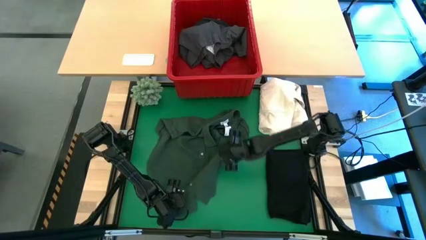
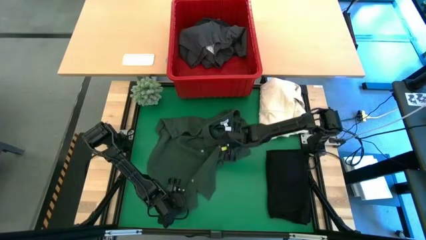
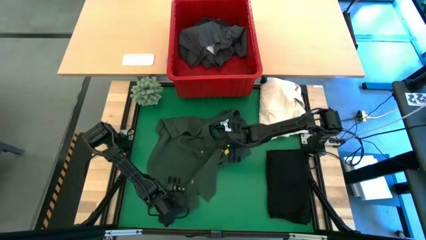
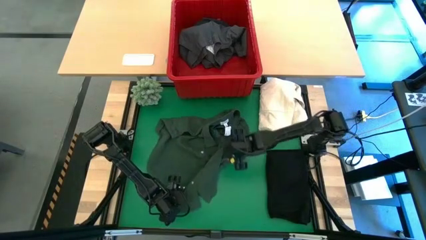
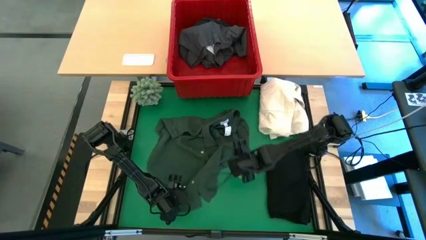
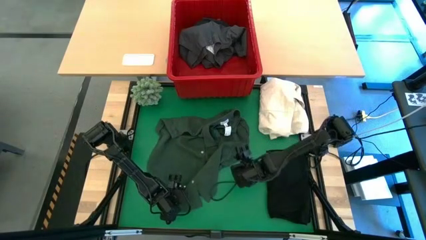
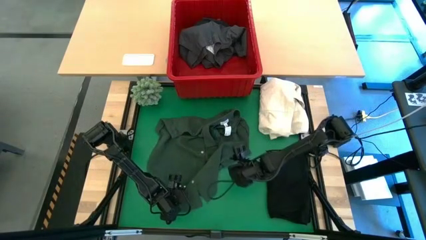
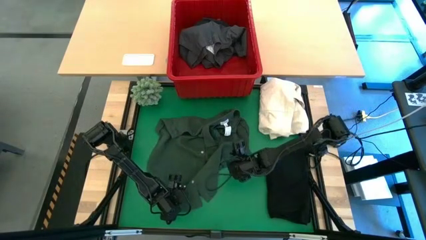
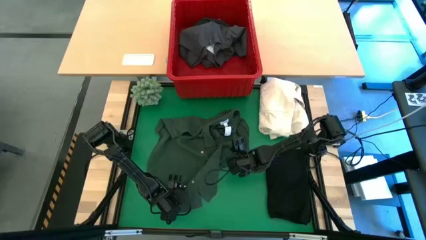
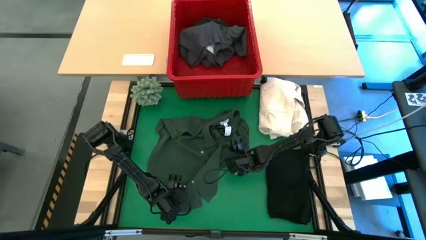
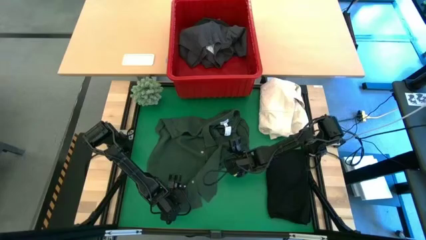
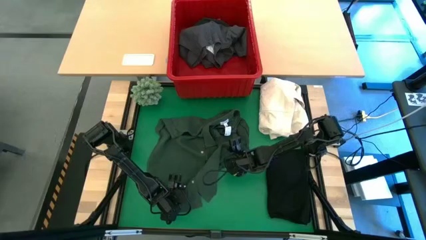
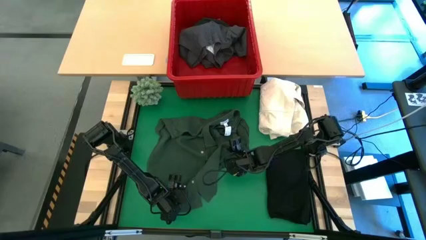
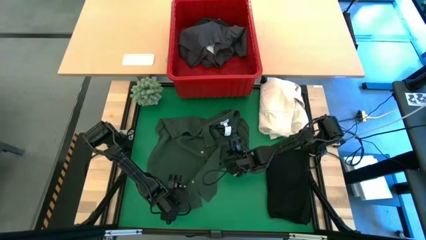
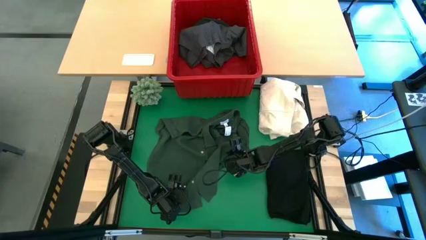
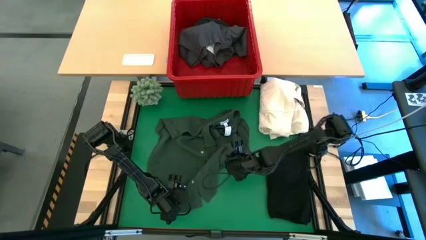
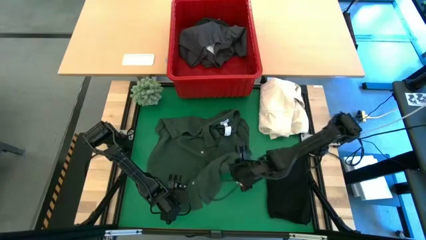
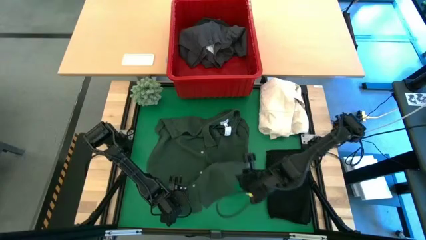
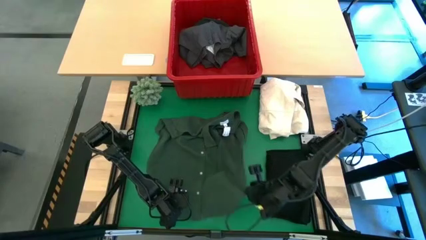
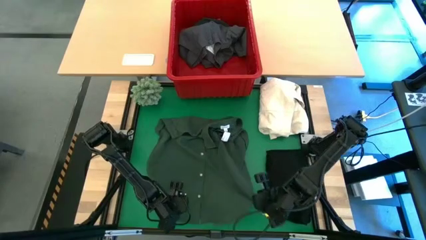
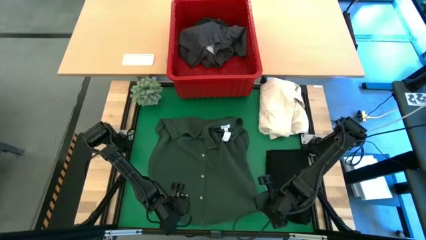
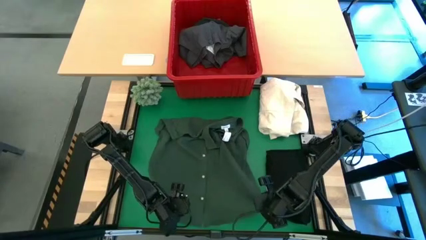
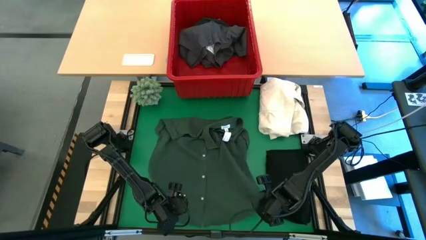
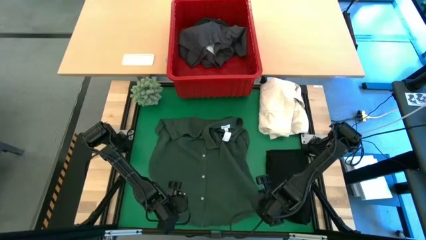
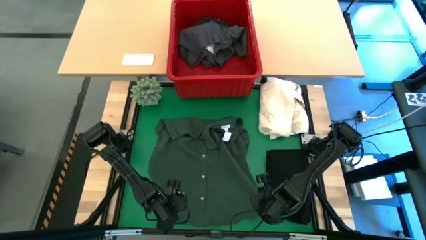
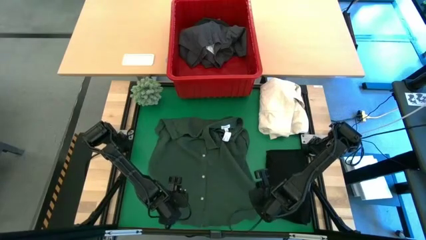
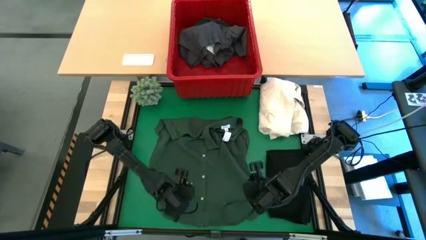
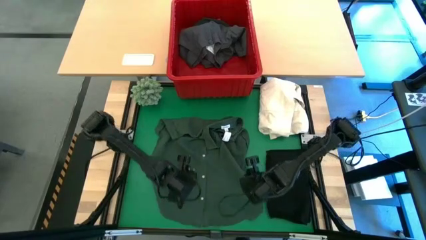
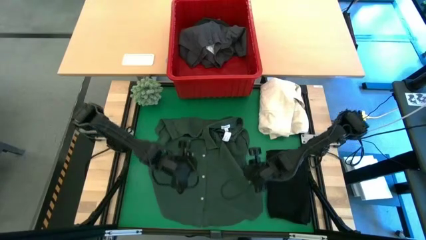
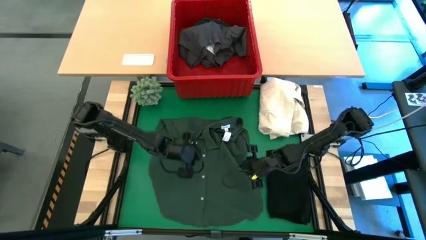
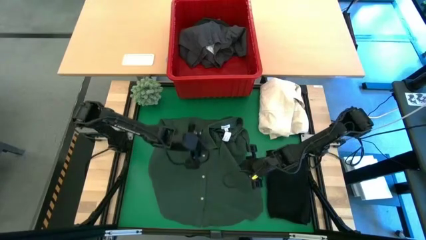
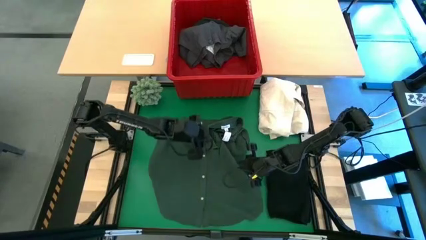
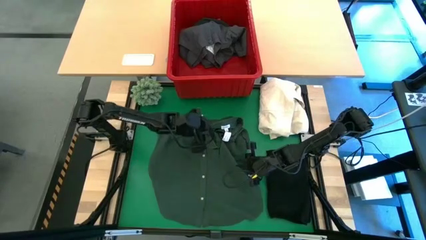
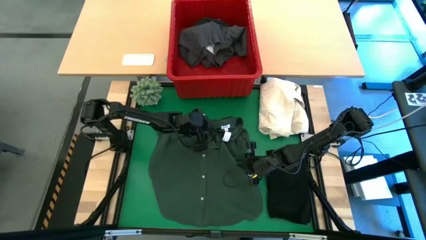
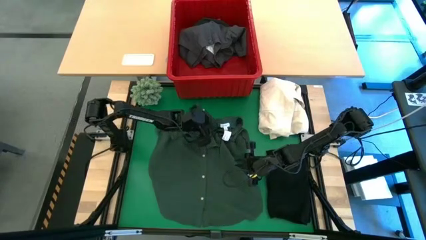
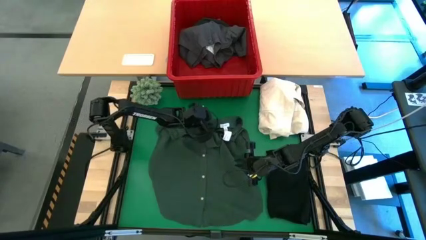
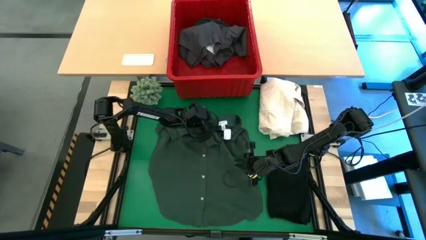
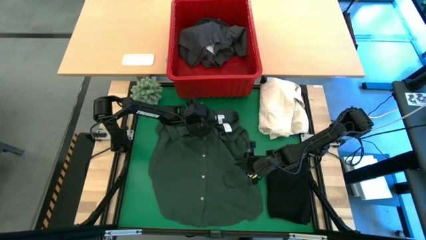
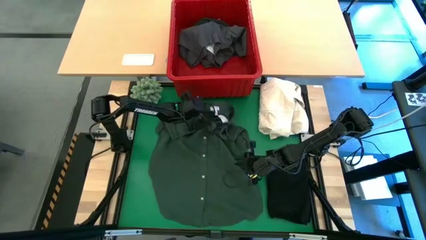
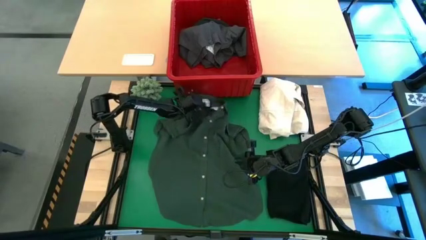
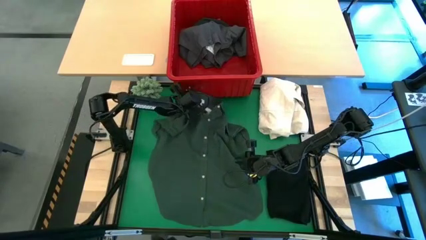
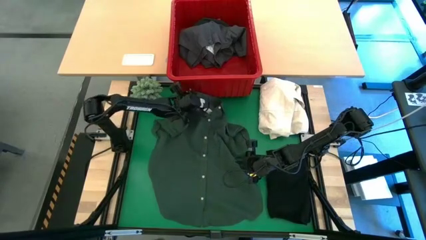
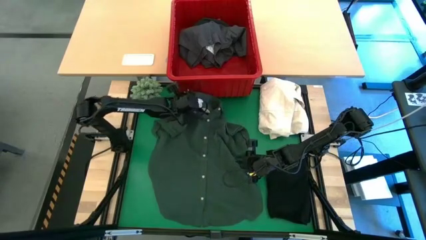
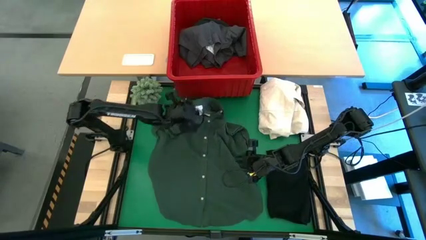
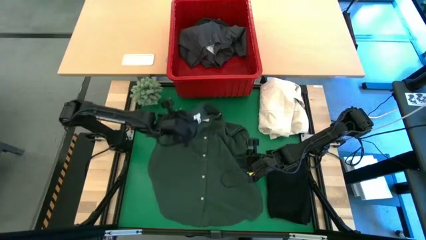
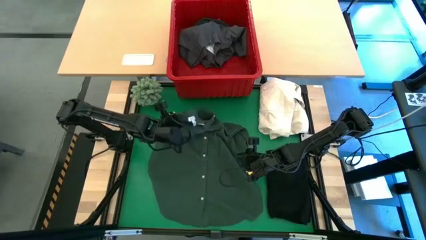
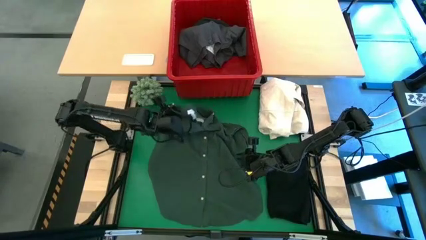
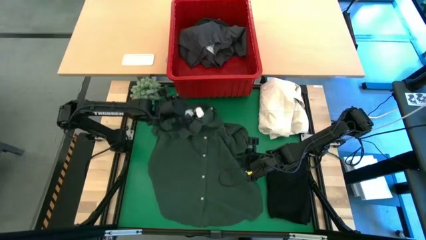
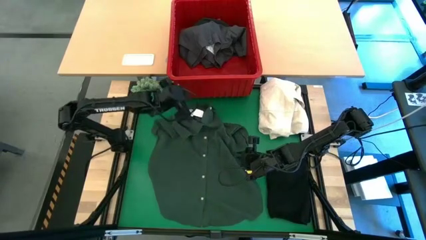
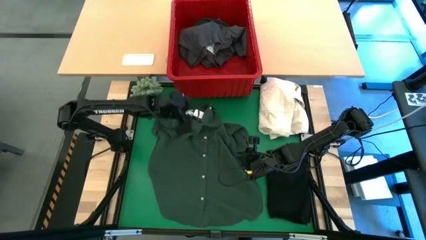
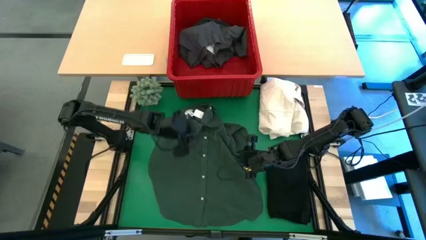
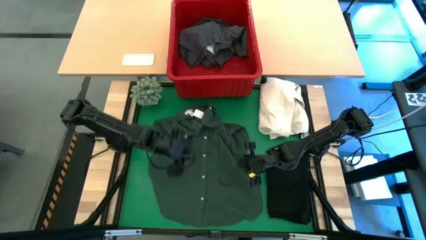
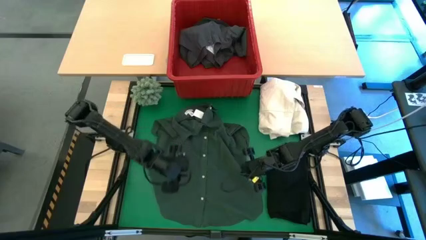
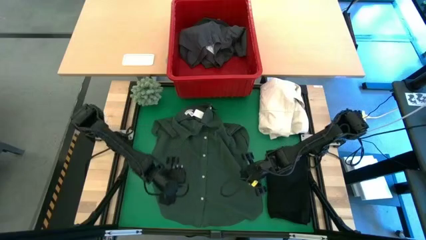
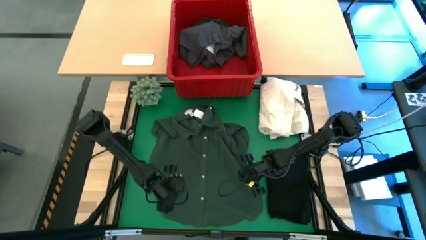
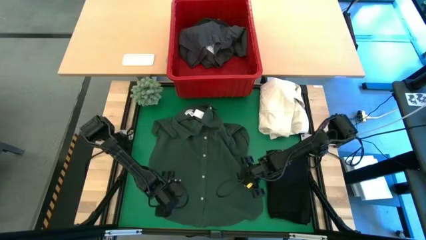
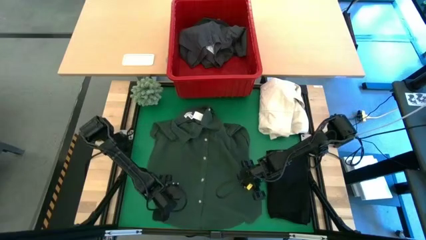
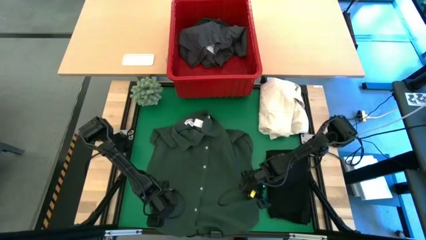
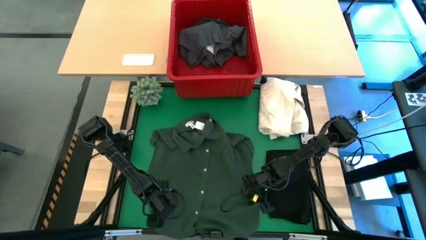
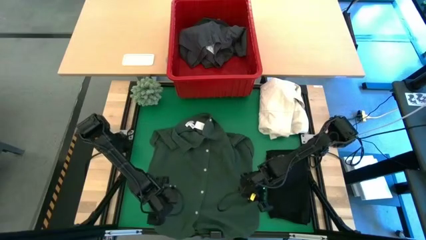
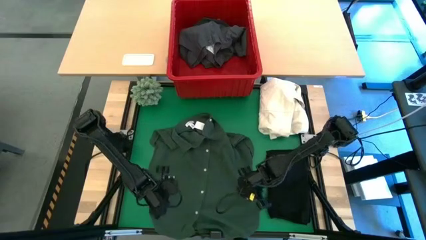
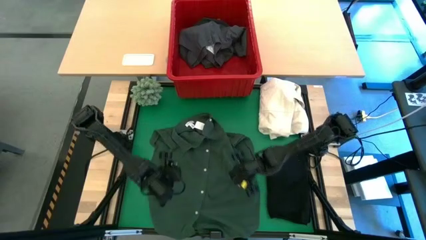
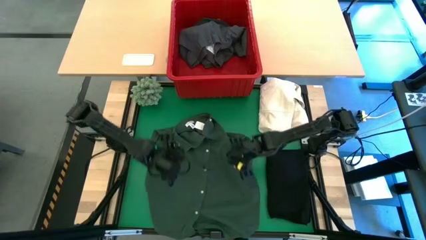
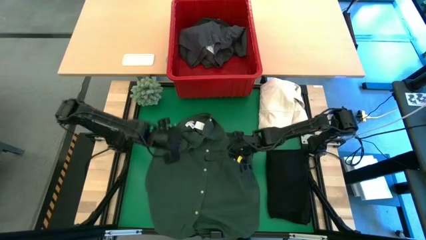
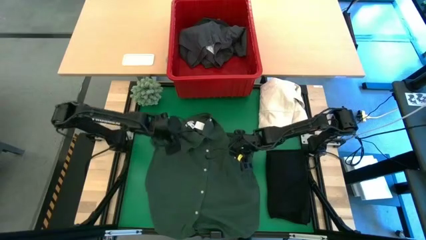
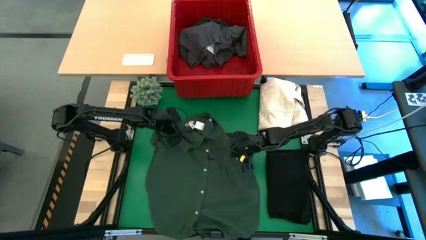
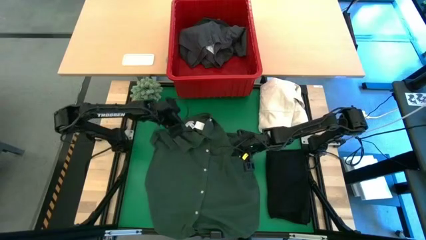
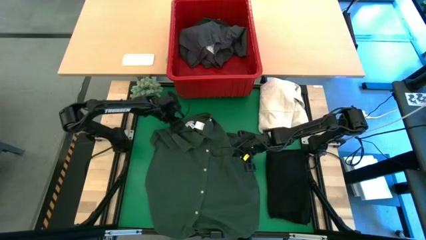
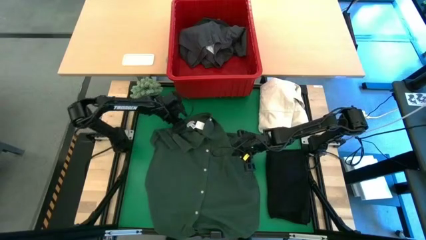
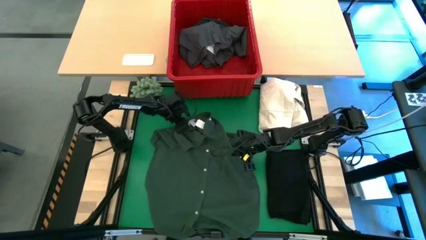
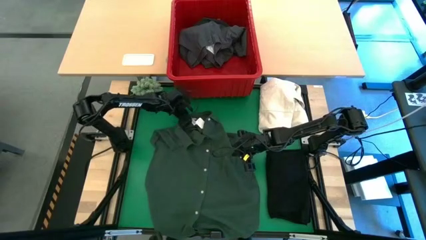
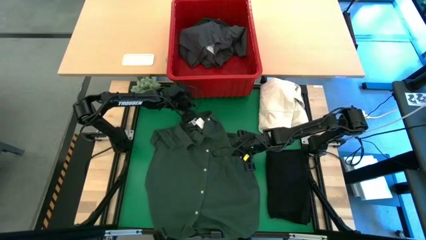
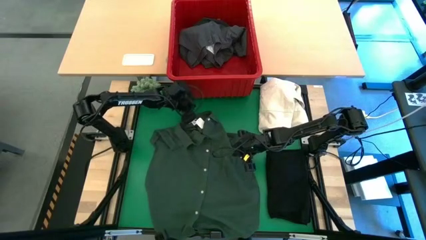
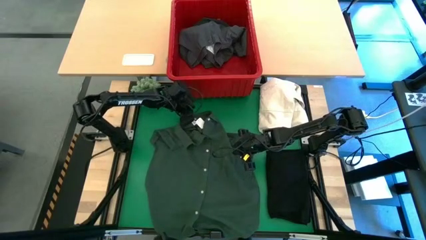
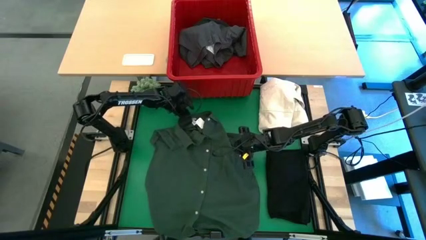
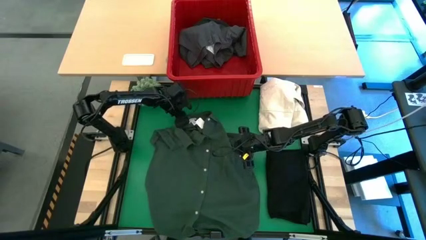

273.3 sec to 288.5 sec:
Task: Fold laundry
Fold the green polo shirt
